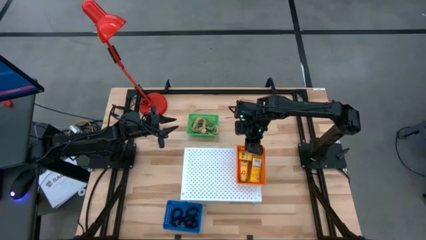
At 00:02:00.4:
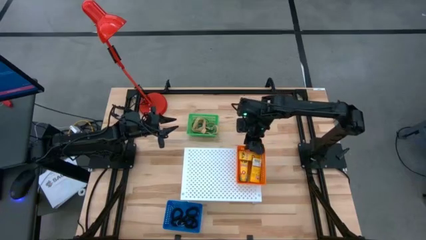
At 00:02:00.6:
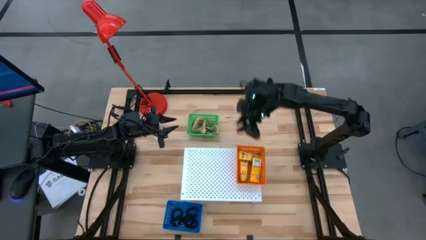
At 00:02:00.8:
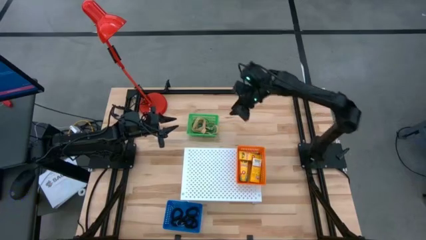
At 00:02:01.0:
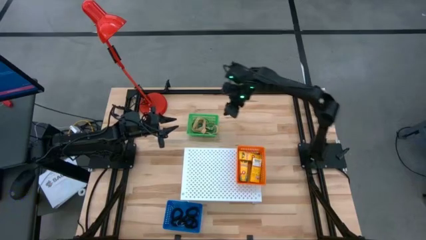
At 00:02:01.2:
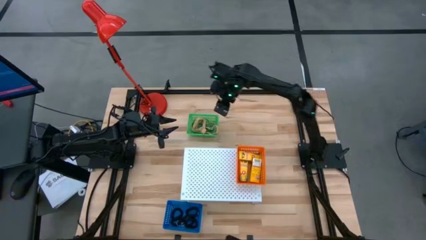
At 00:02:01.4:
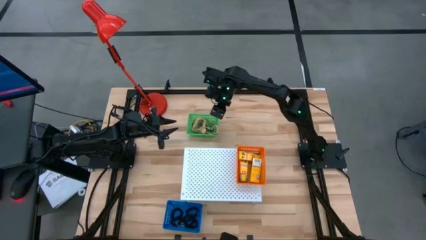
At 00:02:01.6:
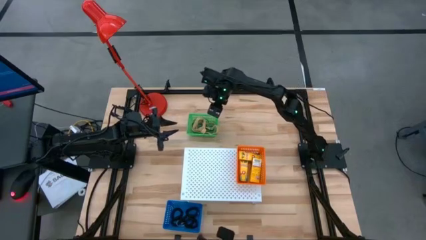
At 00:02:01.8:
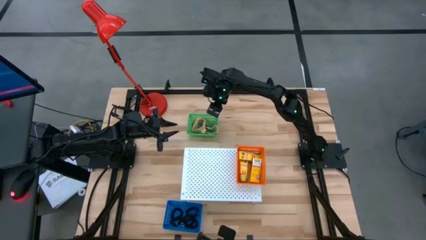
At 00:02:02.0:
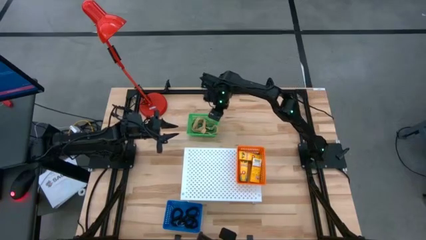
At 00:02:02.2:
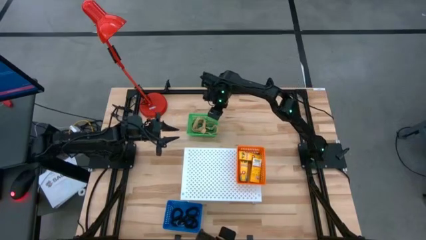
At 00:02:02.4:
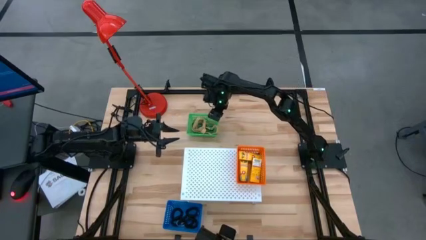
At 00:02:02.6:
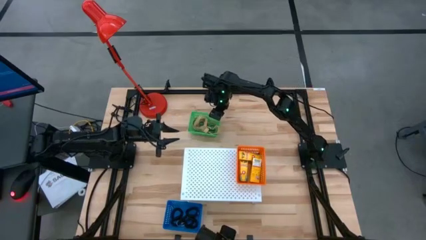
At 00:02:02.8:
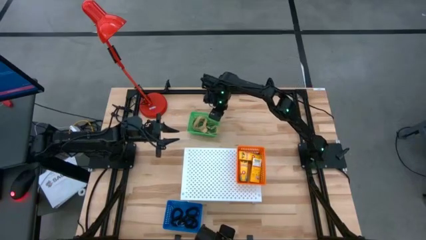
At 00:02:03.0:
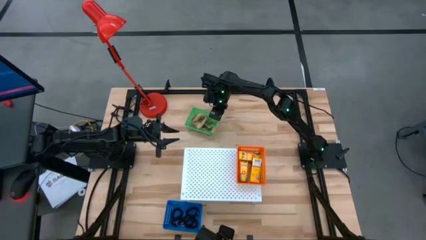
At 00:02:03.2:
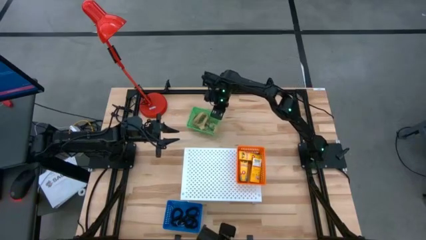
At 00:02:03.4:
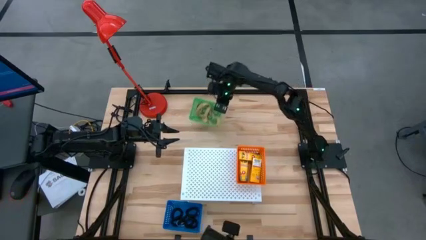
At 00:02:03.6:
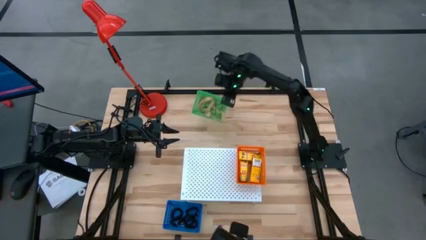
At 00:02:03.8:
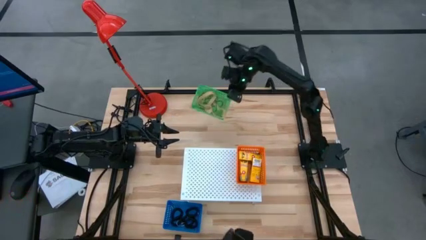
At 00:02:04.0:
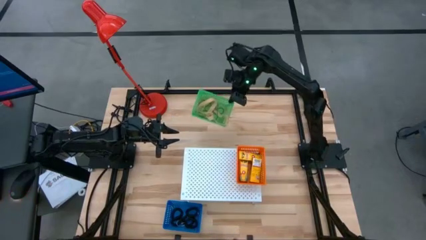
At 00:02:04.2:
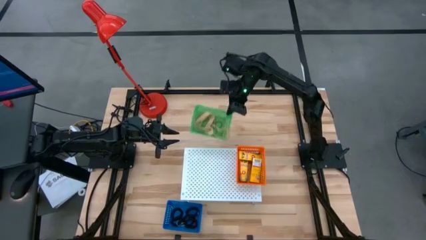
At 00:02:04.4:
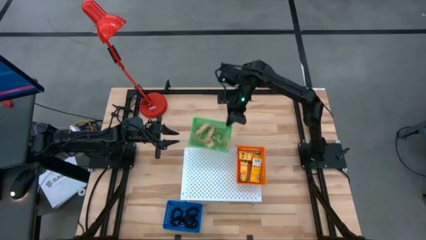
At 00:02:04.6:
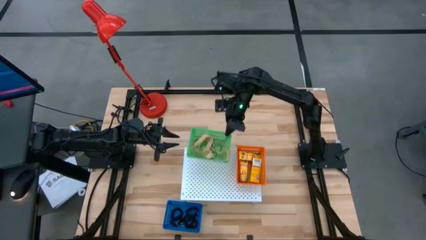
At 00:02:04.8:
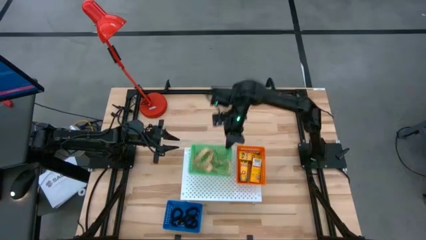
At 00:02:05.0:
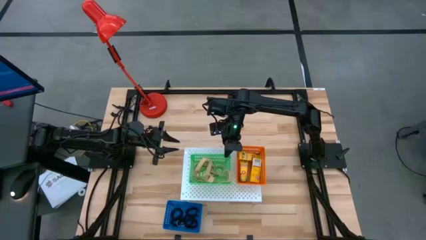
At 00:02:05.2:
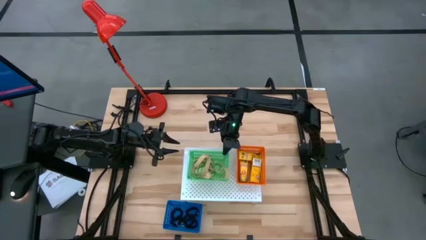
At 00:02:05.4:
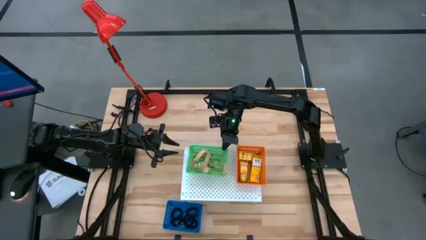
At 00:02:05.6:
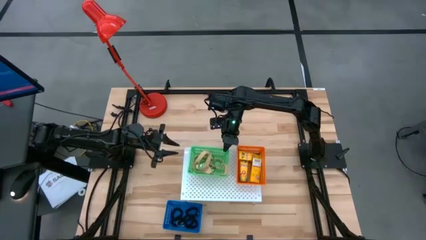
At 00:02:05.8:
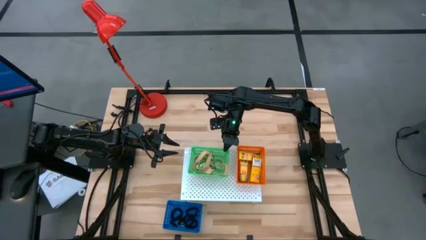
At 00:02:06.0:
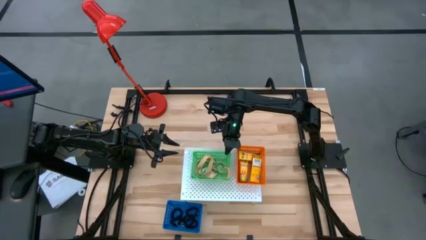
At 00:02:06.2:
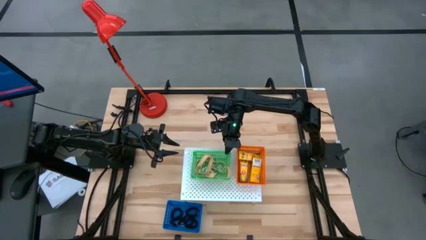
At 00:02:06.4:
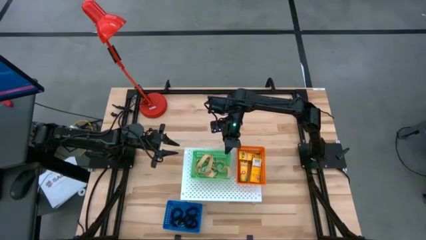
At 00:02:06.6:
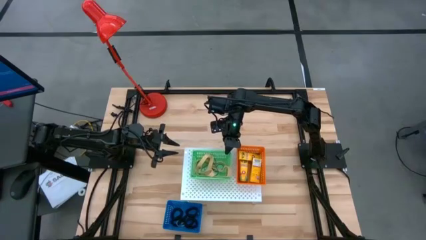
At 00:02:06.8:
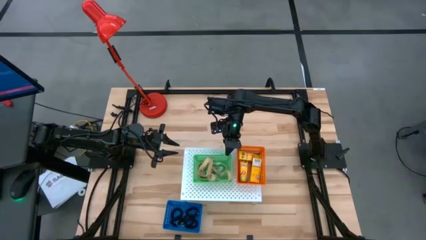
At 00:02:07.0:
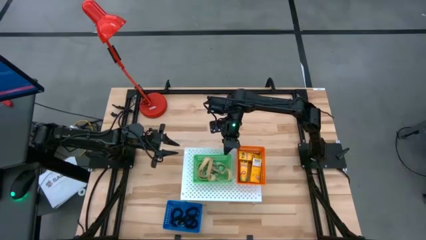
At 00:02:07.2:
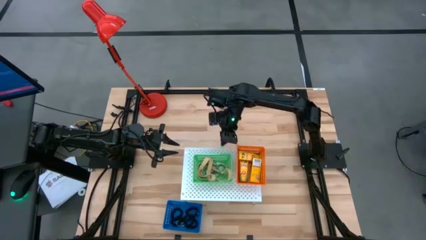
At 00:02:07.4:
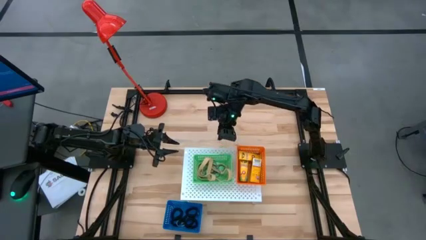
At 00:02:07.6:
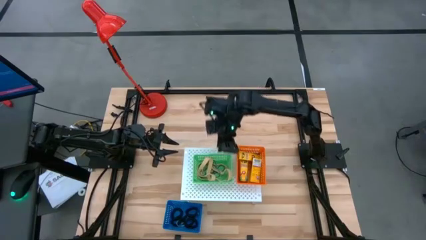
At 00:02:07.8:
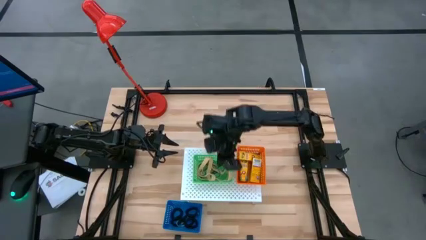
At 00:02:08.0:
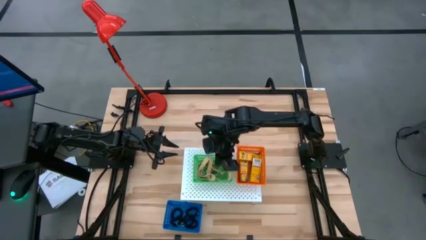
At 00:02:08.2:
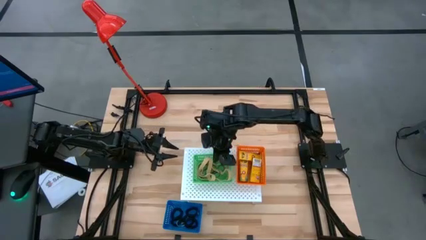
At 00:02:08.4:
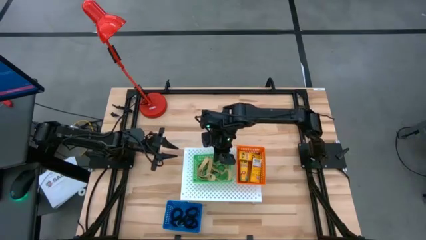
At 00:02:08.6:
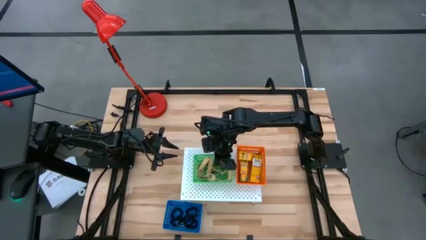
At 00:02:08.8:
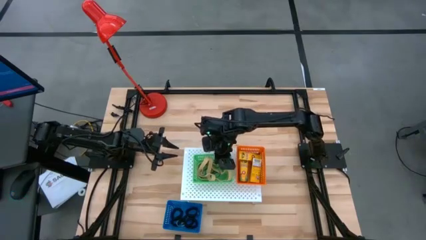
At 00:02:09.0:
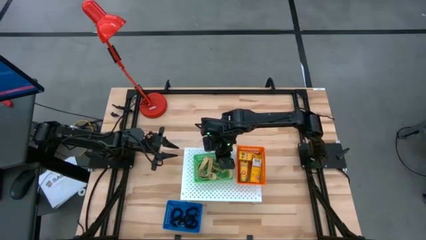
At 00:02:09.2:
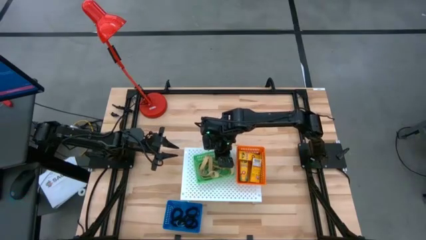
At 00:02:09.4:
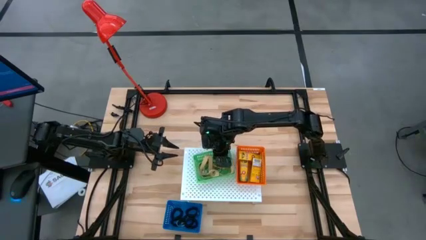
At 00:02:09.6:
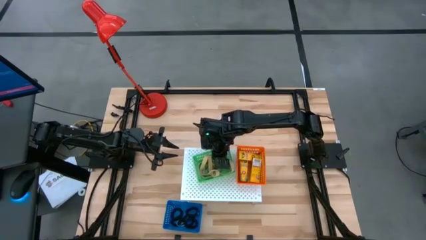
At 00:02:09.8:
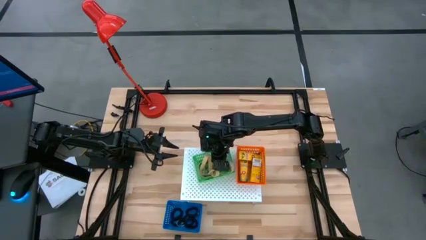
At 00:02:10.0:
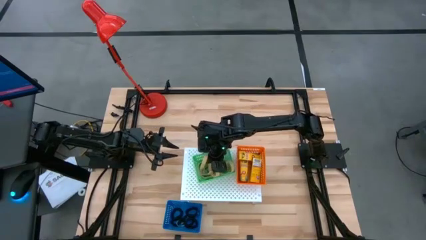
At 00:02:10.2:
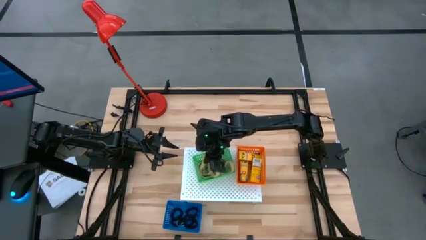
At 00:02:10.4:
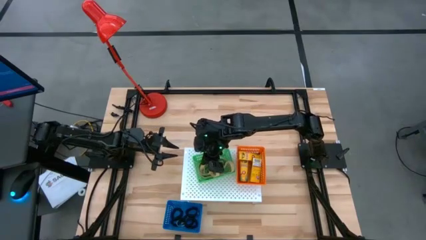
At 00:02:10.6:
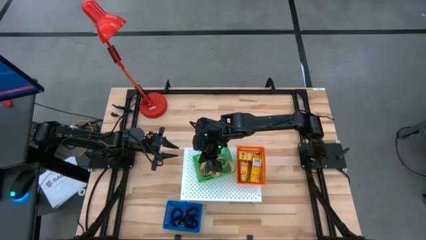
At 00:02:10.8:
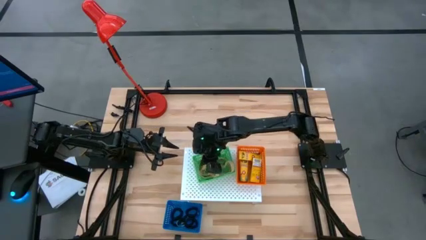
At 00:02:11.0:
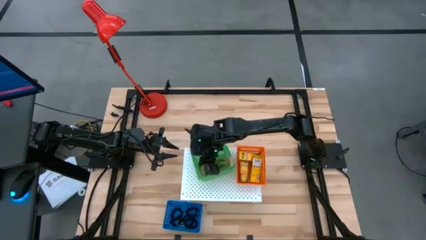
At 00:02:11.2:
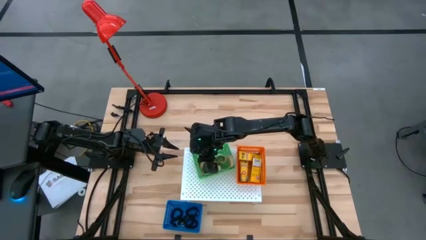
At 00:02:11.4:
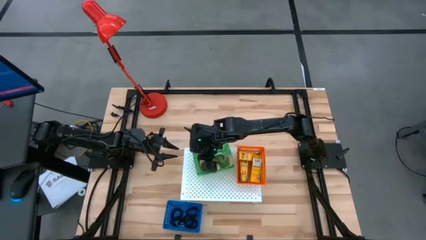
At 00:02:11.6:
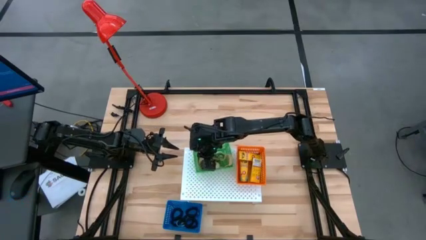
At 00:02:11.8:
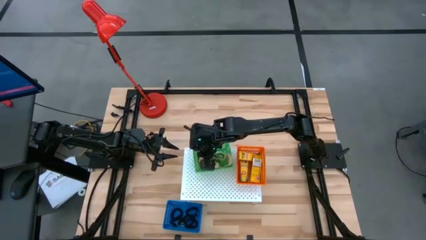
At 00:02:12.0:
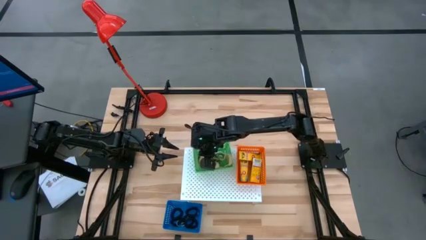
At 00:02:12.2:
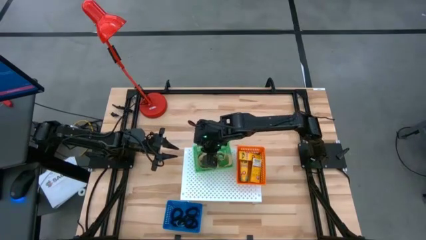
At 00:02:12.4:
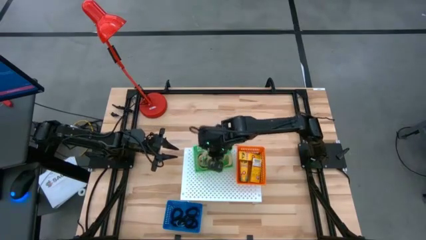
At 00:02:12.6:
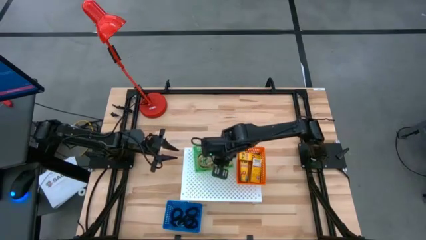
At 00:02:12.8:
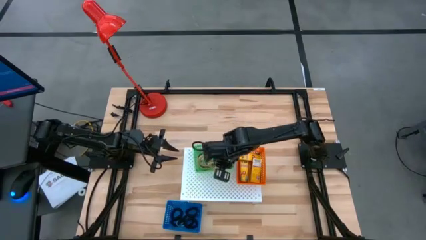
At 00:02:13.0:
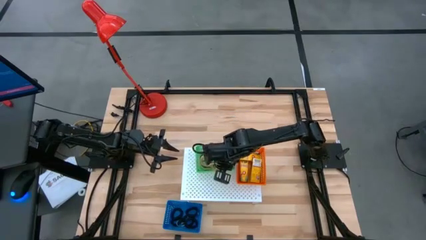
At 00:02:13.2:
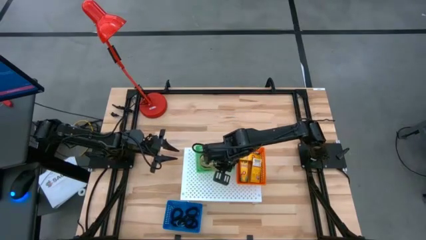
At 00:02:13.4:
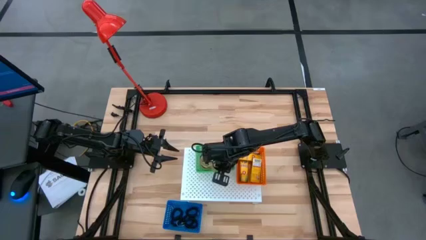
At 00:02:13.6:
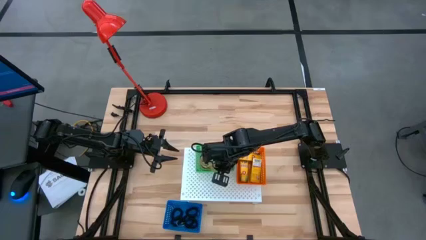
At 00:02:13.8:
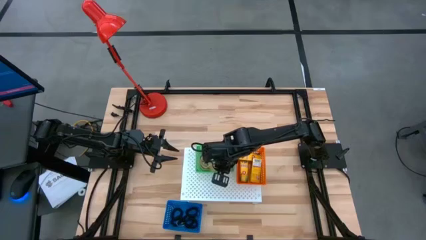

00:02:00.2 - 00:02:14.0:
Task: Pick & Place Office Desk Supplies
Put the green bin on the shelf
